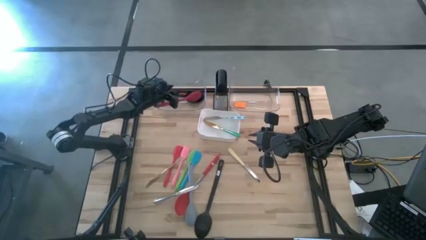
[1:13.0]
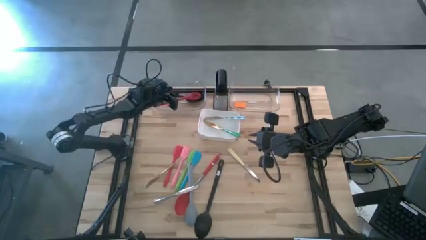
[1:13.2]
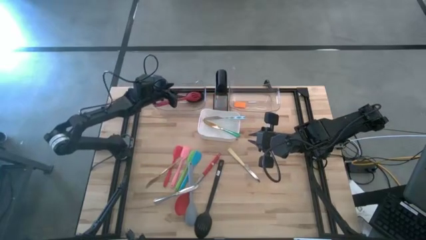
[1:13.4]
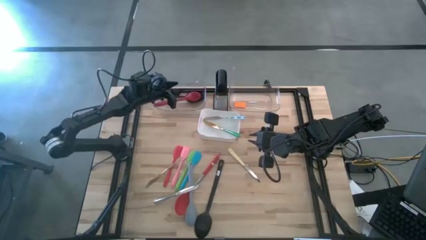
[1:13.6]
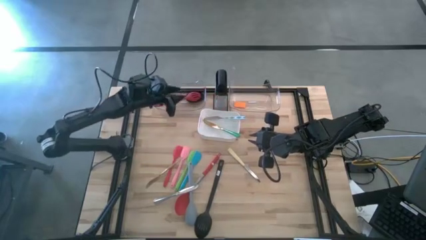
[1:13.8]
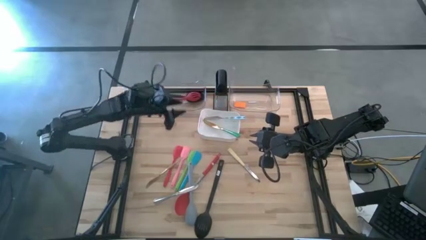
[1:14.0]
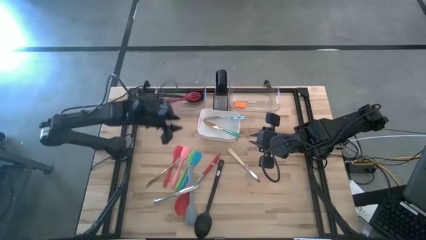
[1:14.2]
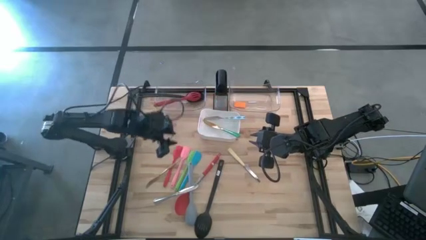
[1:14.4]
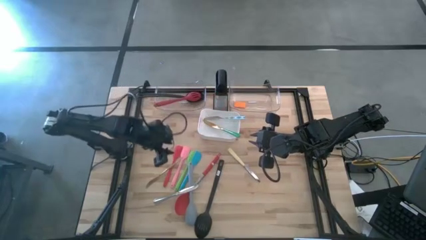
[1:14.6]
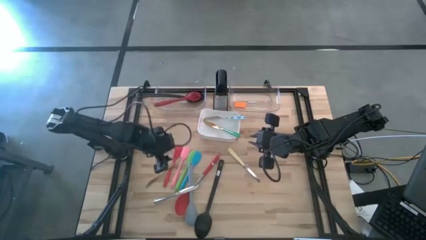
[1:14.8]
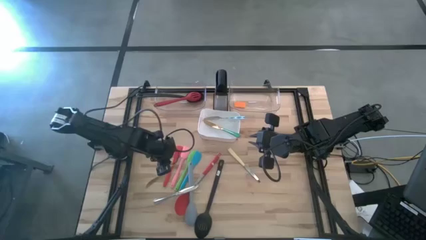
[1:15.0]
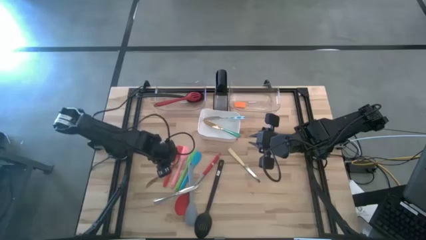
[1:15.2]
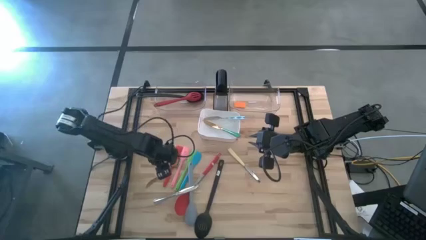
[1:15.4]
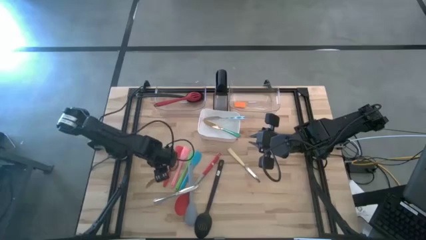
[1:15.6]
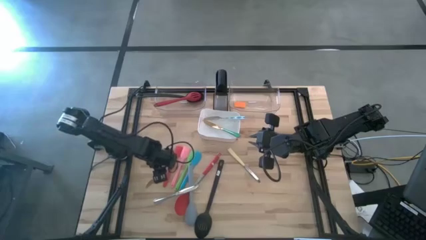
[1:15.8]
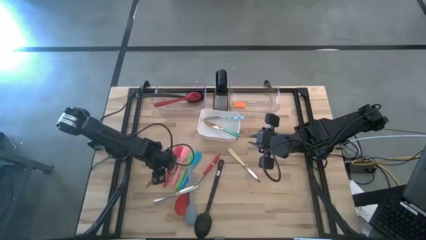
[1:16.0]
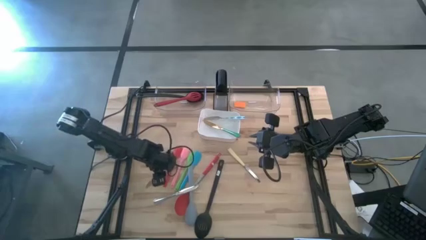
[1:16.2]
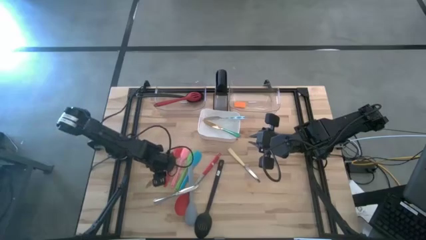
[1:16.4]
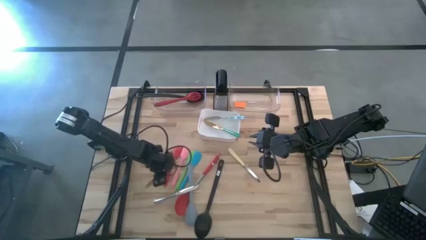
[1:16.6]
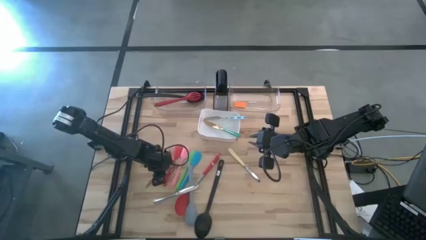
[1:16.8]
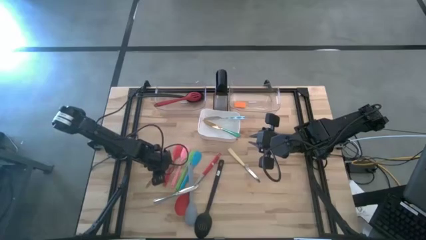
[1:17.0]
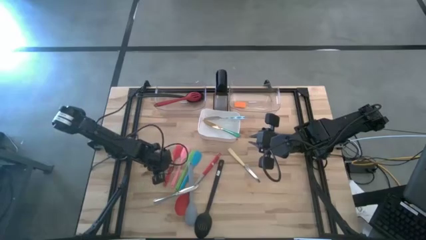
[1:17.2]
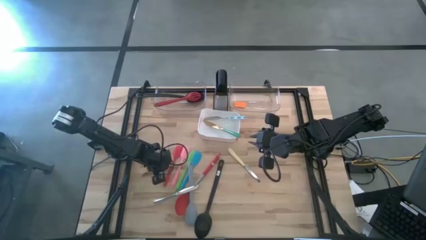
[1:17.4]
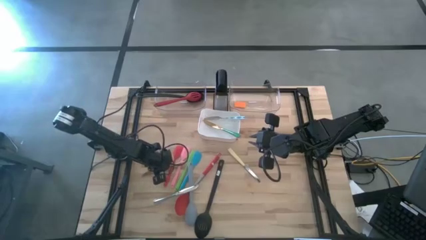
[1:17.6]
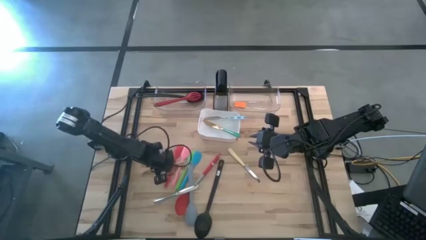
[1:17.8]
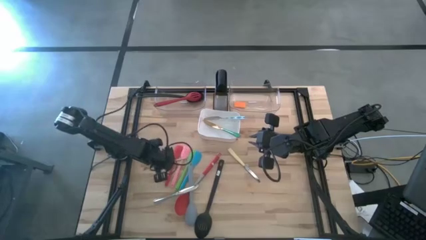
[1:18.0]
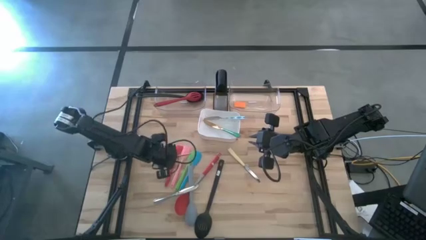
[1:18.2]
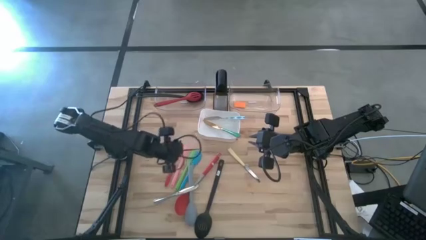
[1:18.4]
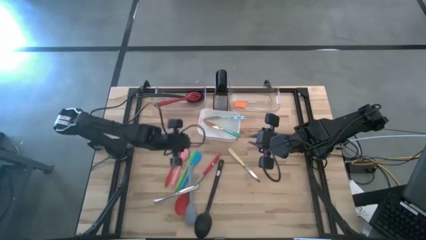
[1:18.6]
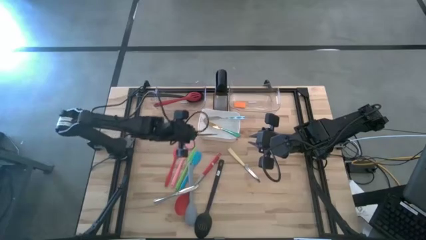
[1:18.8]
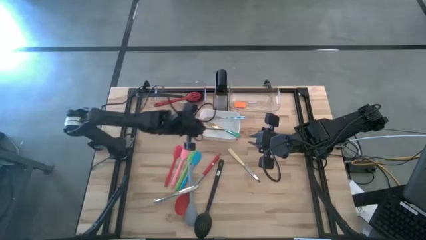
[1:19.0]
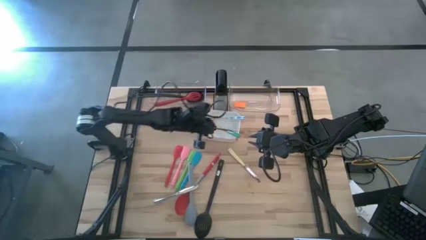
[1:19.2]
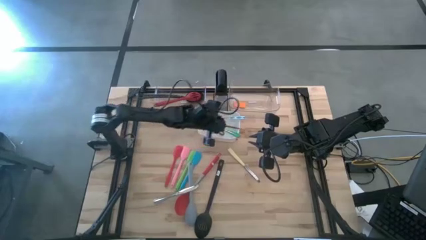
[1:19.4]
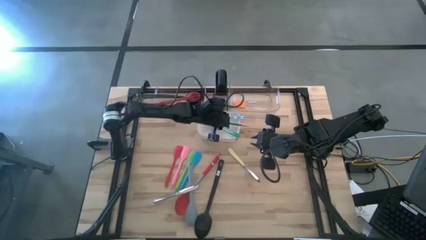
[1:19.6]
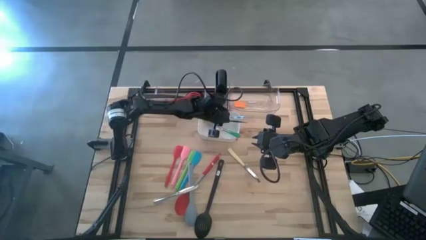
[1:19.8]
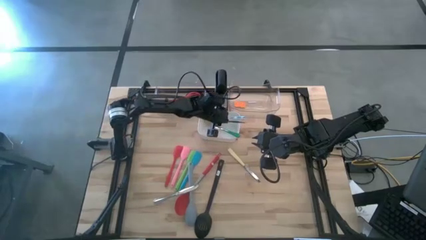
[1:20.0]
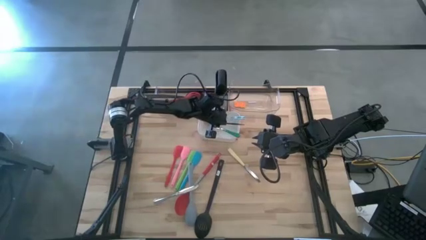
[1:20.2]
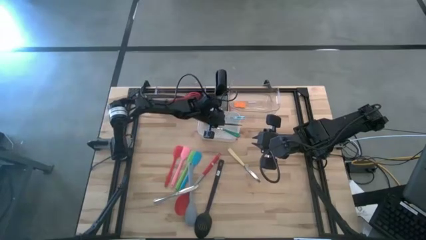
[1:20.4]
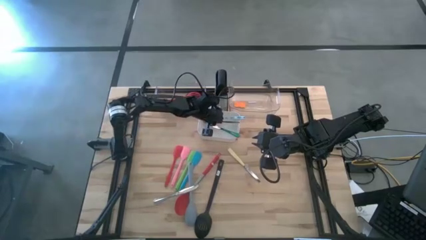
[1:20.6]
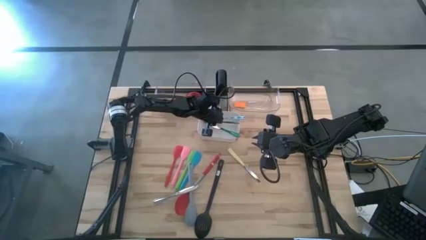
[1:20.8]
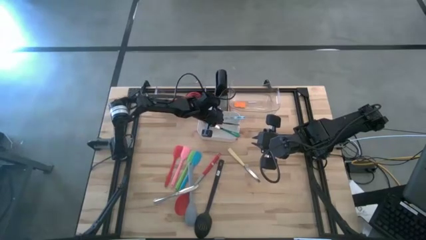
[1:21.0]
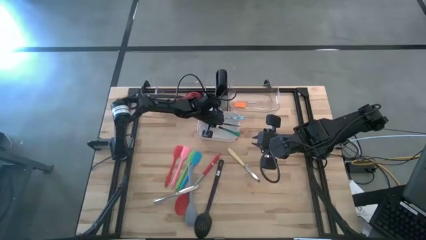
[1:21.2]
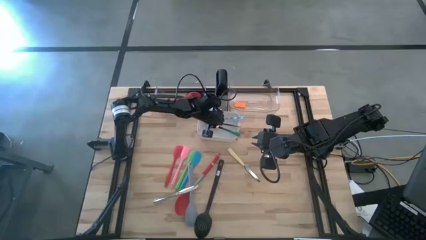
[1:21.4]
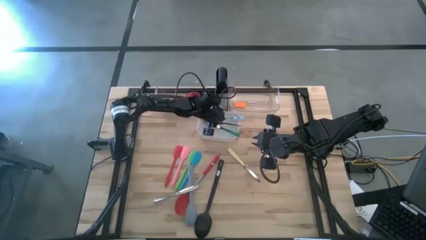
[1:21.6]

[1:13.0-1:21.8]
Task: Pick & Place Kitchen Items
Put the gold table knife into the white bin

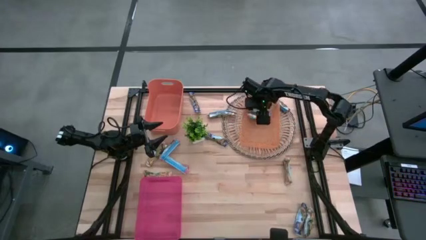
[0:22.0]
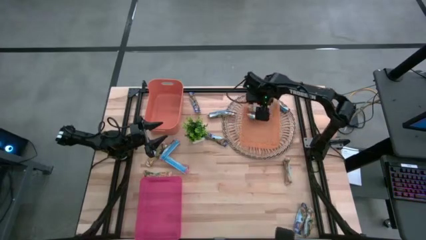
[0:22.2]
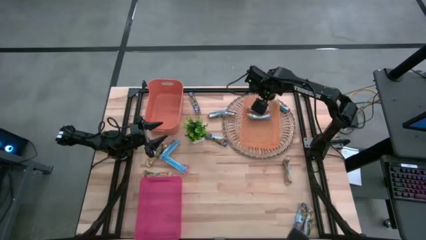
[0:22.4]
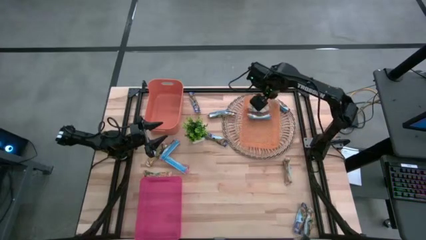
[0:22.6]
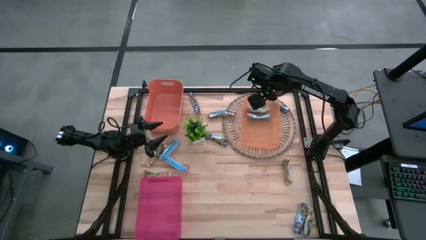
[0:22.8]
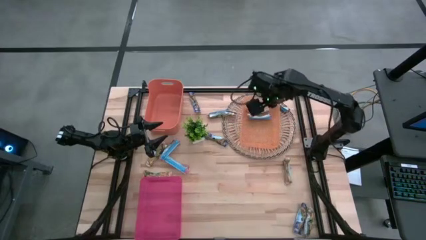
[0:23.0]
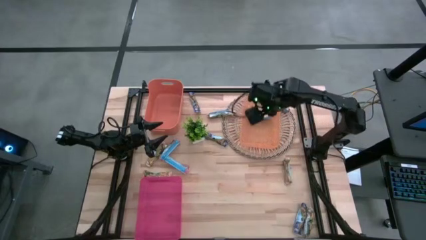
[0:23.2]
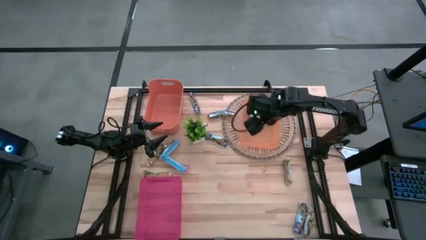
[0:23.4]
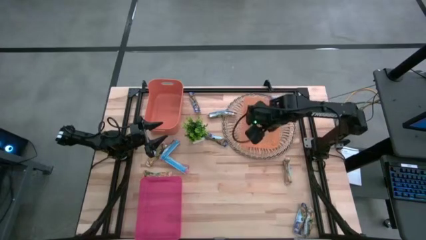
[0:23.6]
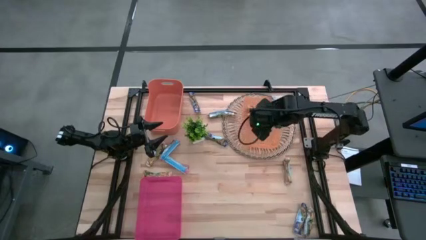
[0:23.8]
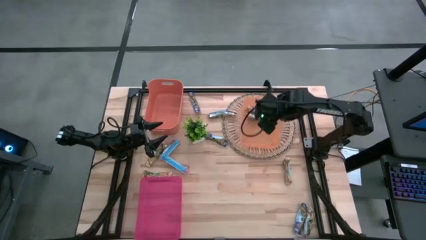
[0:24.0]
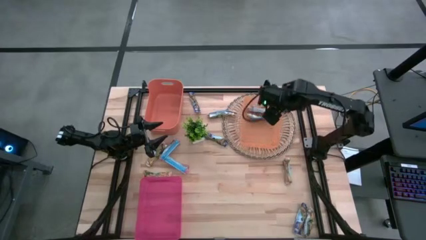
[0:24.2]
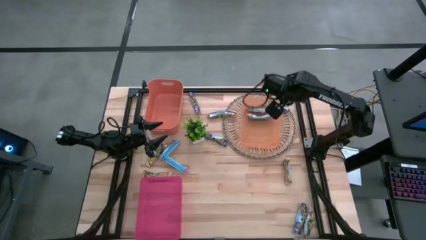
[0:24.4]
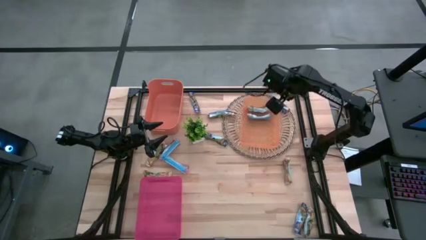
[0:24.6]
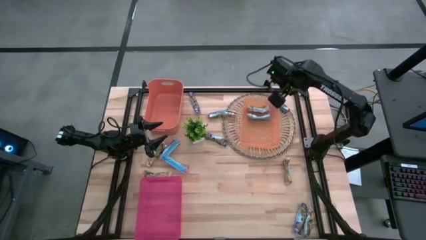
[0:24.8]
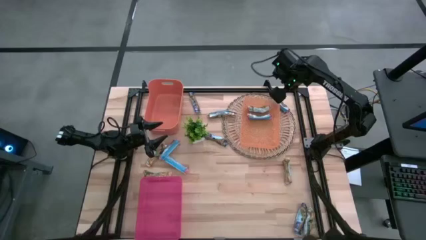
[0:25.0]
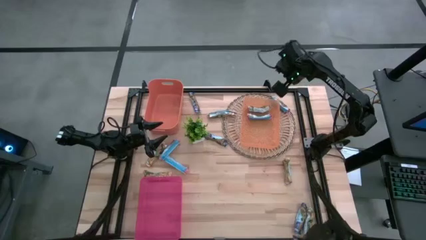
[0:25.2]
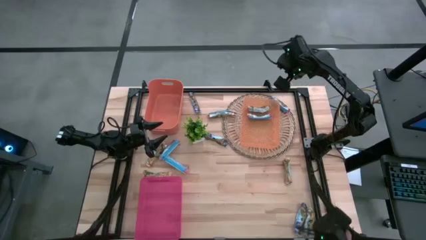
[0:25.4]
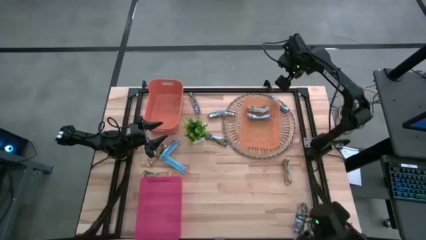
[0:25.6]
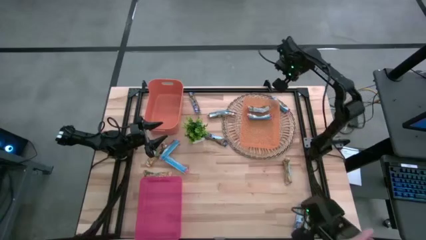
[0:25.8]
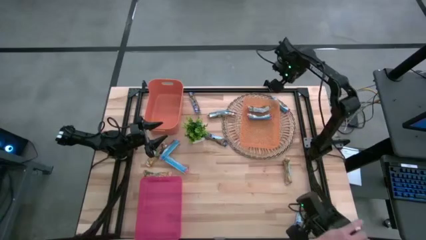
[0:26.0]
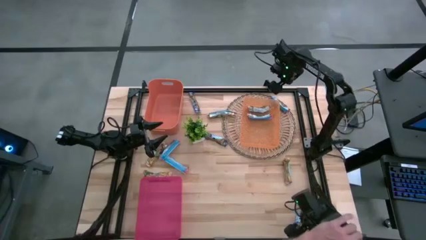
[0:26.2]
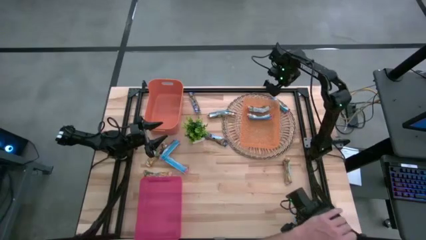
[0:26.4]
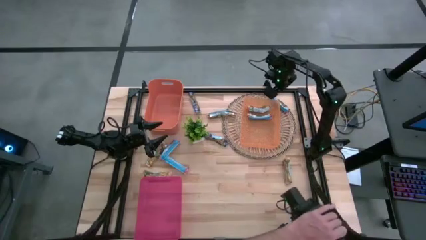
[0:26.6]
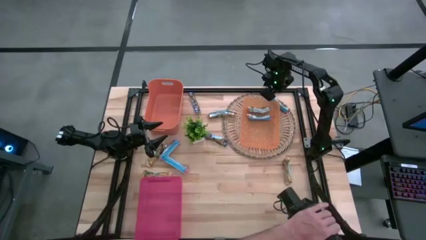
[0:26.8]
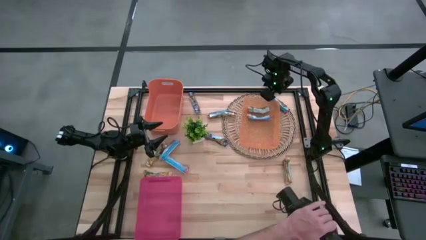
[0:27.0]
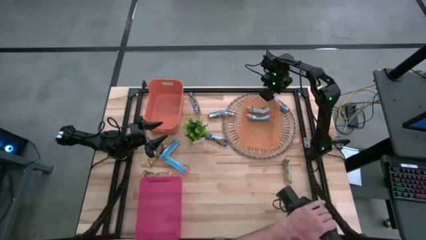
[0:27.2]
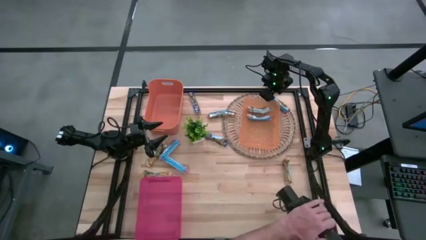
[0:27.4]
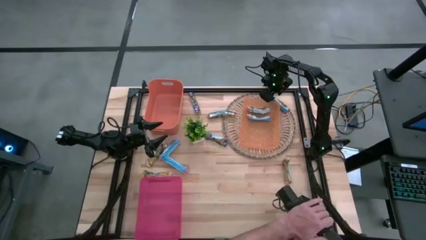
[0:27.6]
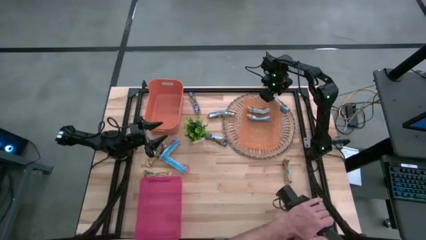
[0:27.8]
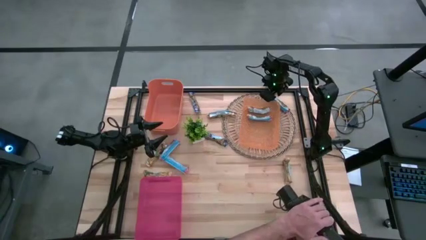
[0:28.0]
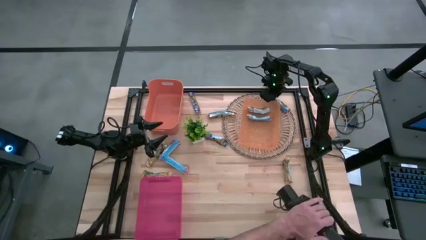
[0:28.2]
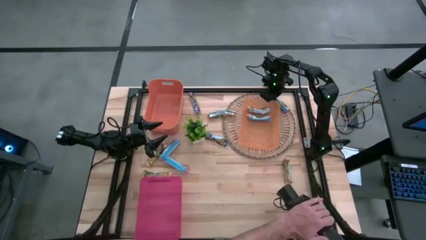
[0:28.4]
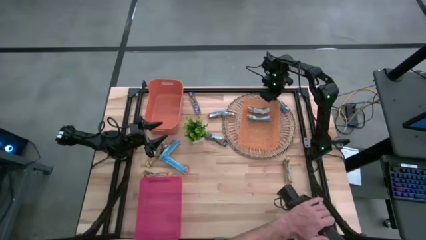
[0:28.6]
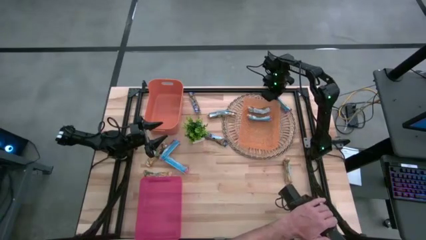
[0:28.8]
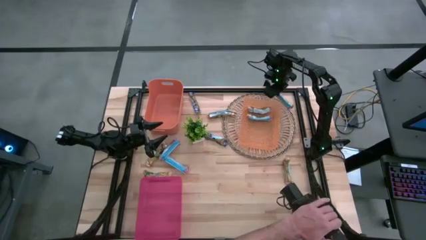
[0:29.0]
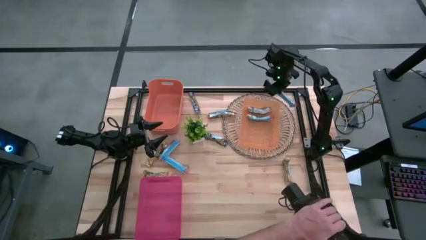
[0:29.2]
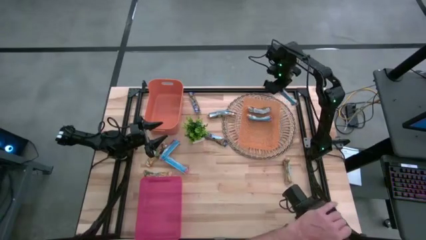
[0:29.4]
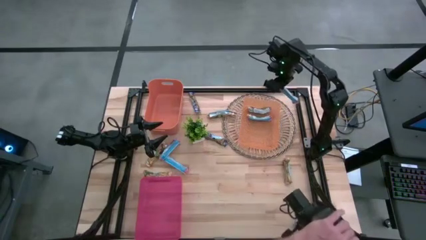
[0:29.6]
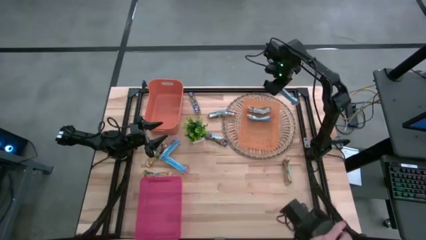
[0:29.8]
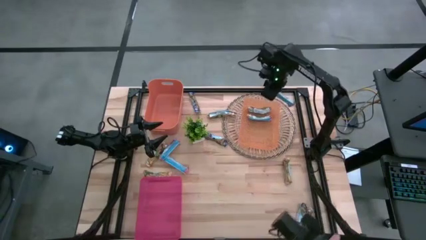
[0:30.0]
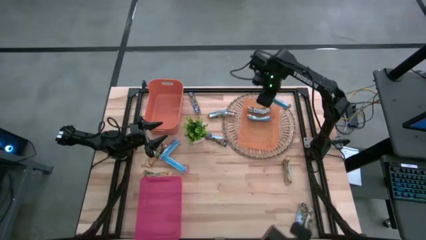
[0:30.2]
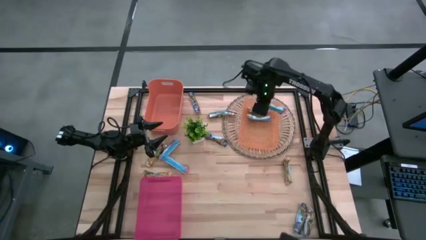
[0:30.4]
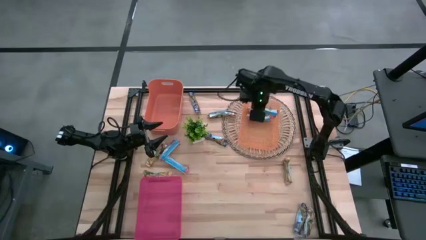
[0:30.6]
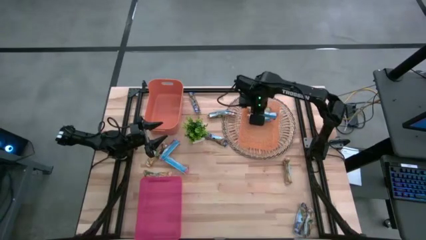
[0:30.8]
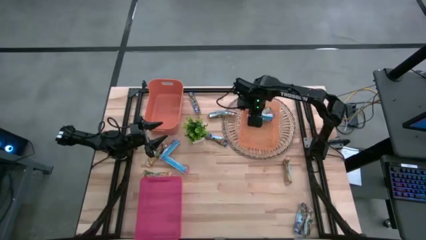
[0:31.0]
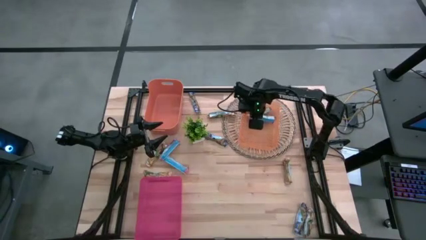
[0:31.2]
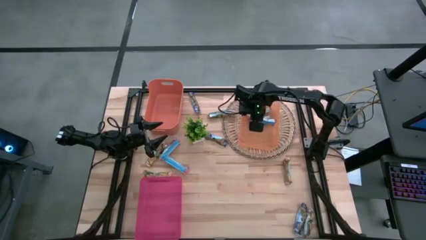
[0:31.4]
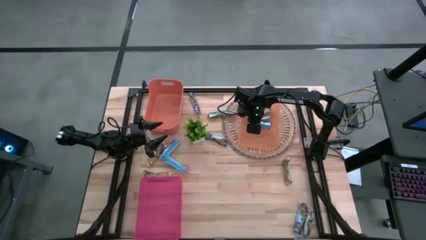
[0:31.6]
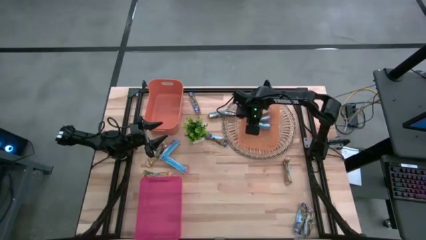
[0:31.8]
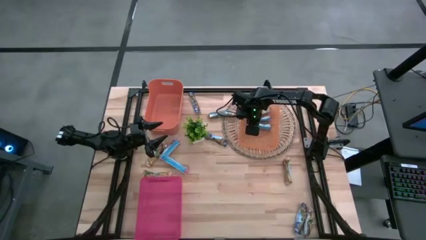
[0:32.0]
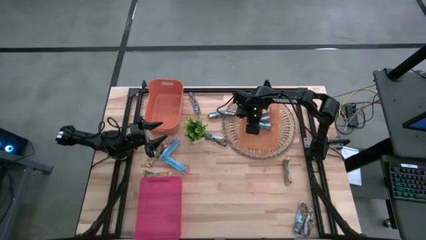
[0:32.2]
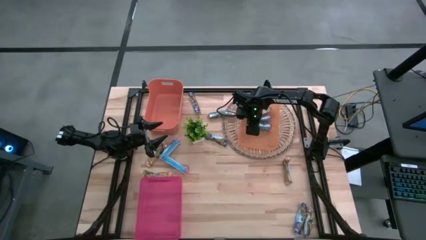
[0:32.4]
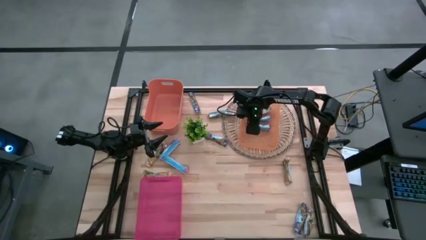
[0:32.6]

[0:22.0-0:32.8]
Task: Pick and place Granola Bars by type
Put the top red granola bar into the right orange bin
